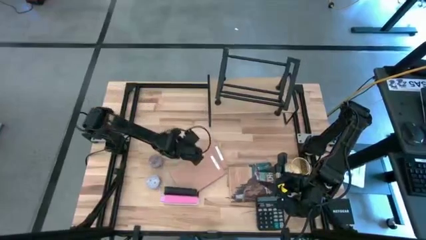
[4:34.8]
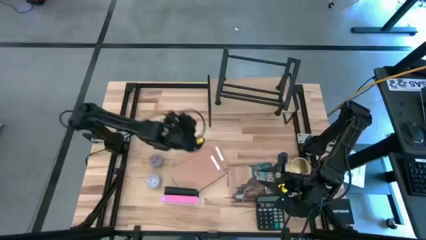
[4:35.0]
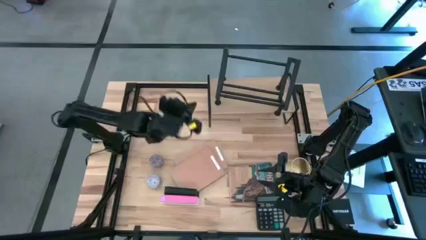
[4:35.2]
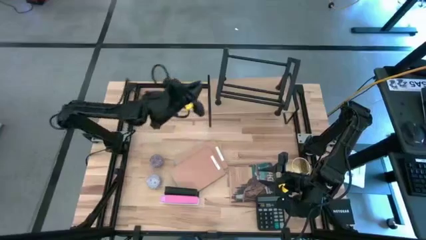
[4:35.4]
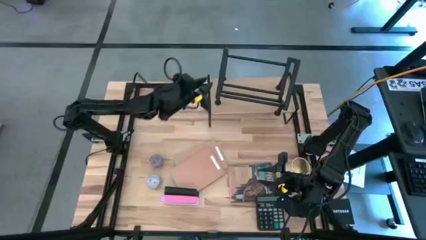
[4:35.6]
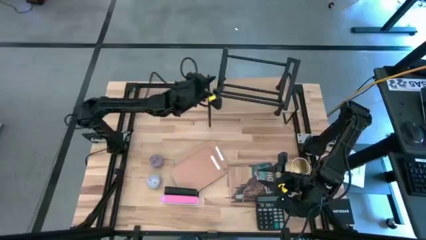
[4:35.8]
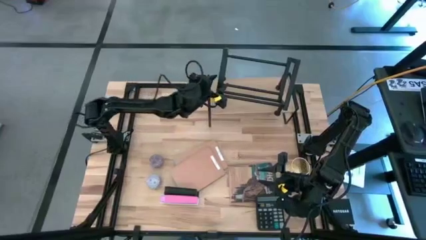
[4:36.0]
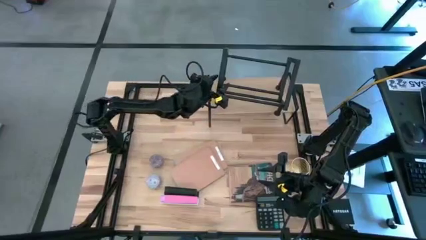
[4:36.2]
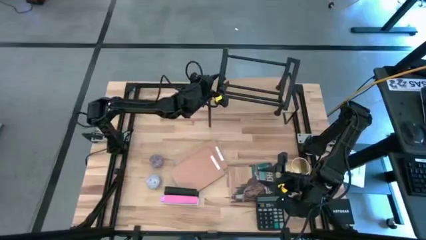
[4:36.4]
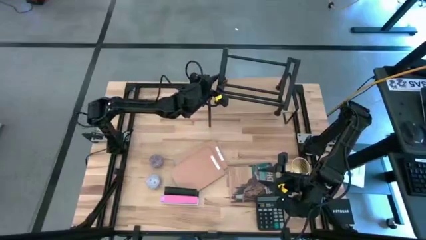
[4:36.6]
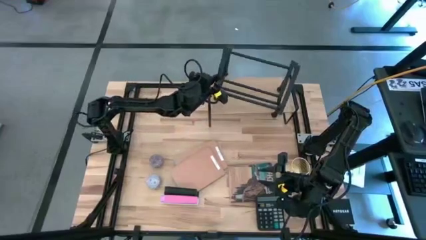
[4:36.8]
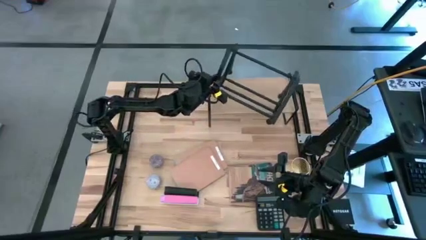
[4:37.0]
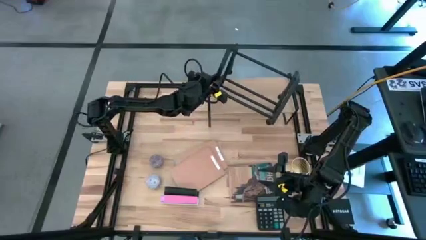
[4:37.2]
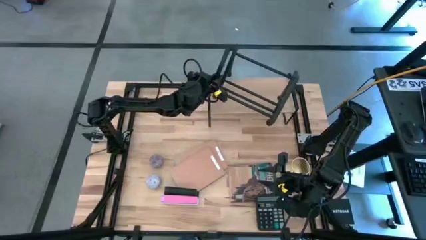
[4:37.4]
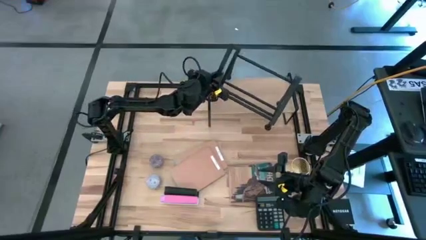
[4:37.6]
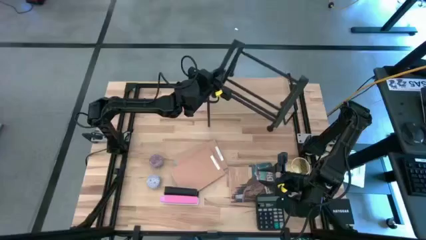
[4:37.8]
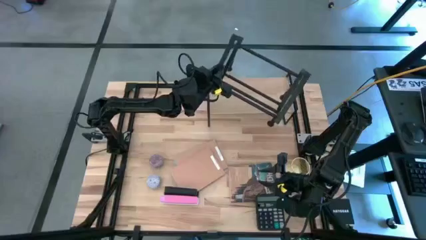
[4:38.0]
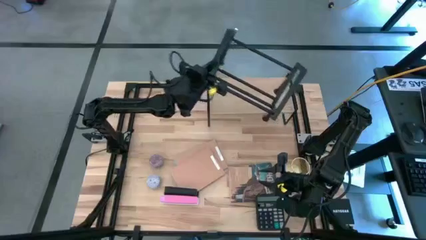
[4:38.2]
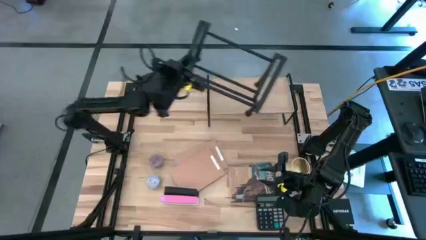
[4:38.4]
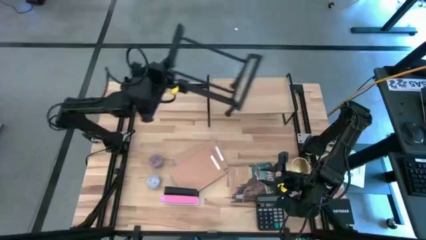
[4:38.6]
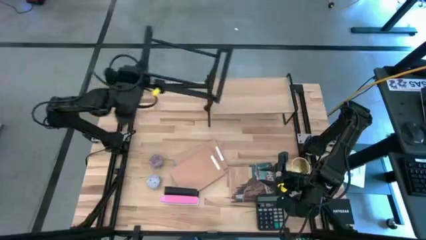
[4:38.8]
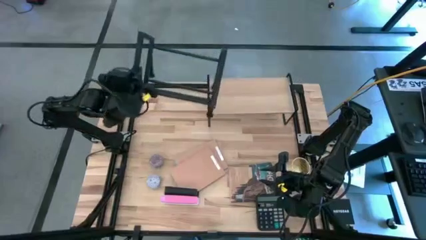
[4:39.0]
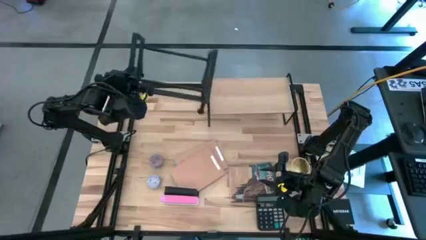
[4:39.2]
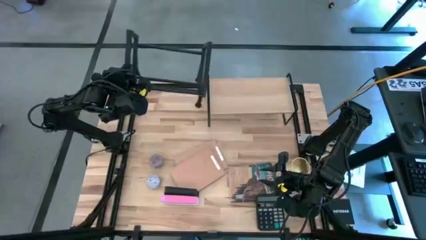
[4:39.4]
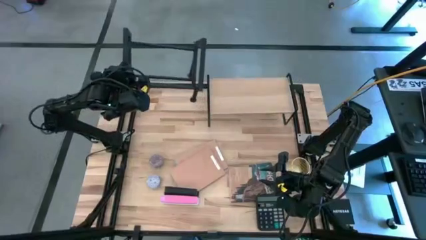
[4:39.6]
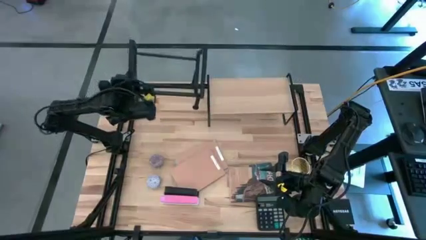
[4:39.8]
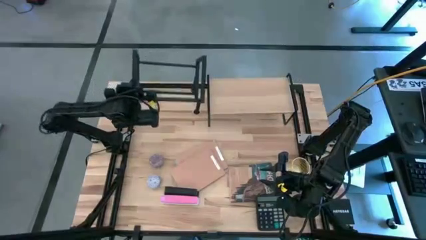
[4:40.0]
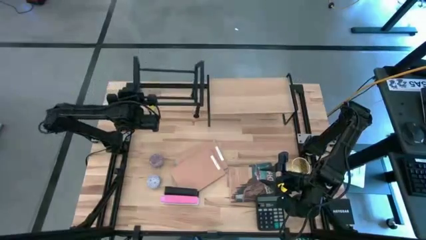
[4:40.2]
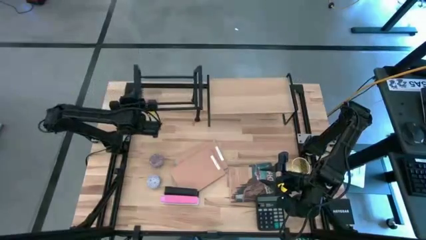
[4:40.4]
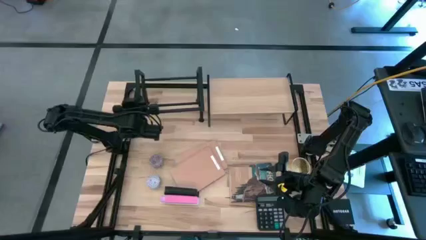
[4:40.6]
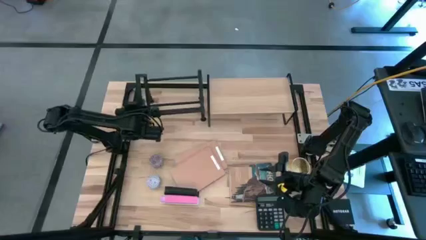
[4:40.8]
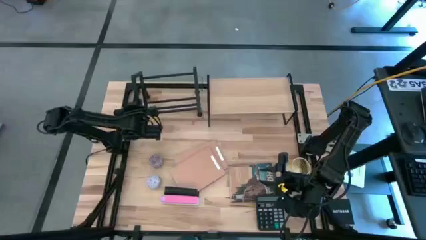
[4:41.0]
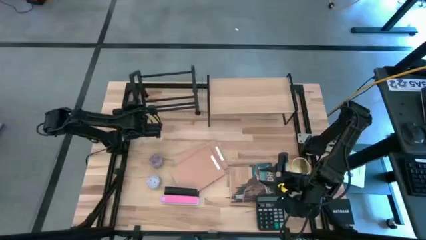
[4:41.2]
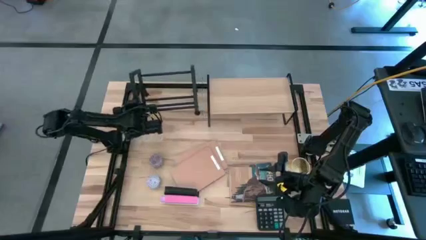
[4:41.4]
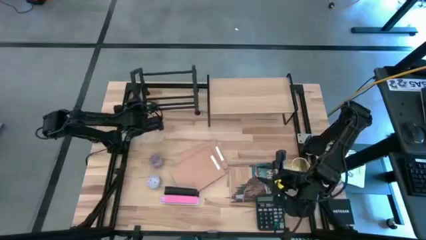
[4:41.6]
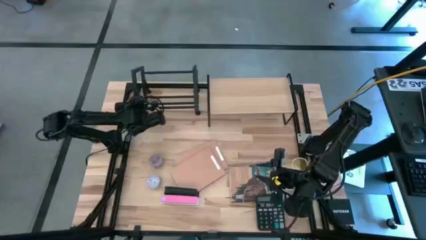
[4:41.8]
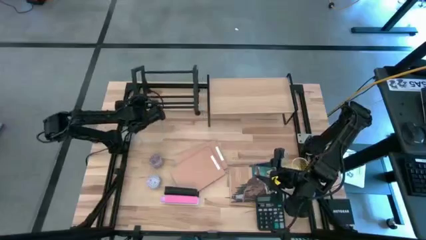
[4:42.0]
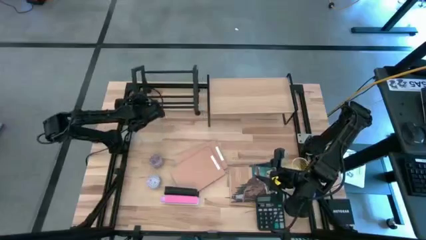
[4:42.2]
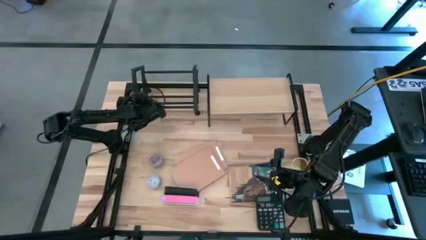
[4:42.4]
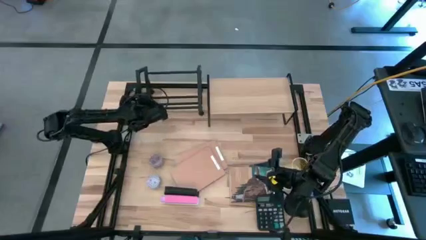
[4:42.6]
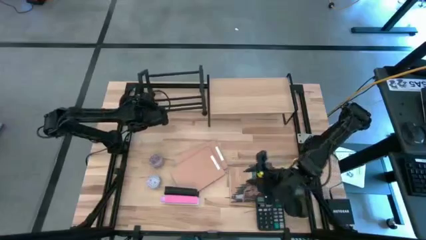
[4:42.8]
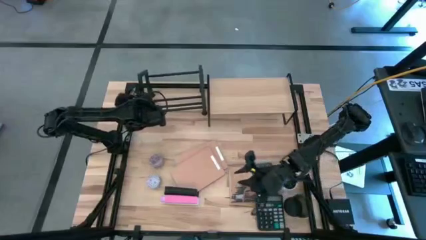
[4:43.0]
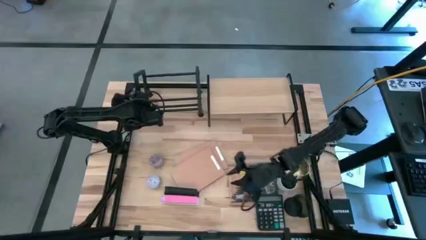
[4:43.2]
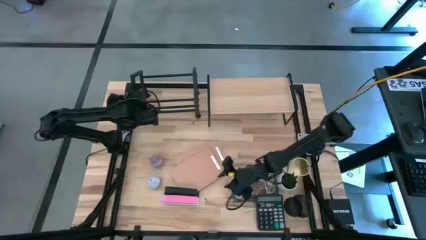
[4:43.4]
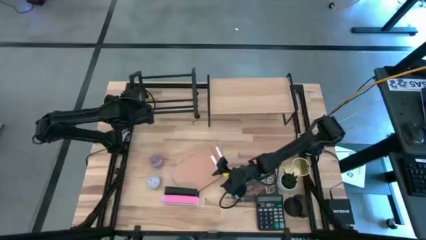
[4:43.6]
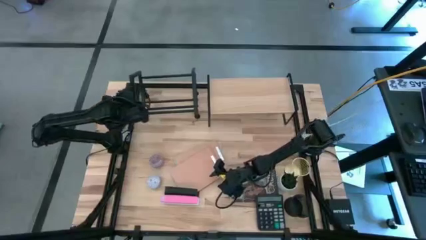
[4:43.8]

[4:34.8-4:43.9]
Task: Stock shelves
Remove the book holder from the shelf

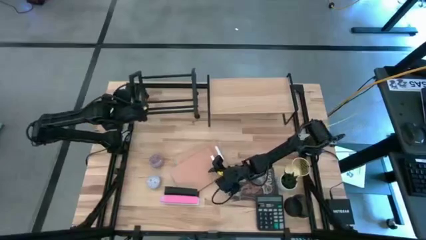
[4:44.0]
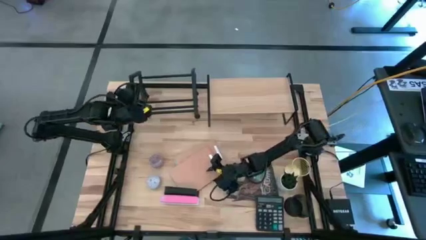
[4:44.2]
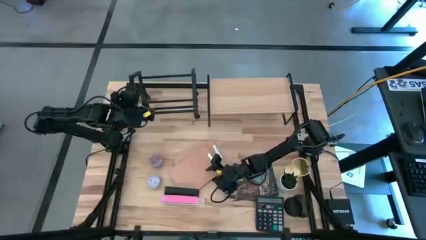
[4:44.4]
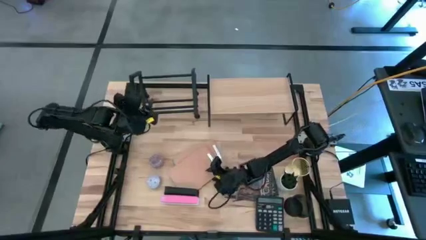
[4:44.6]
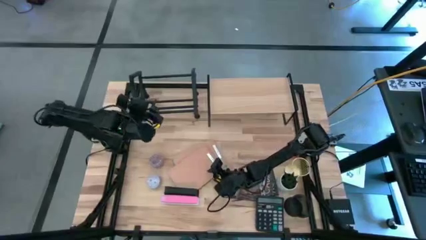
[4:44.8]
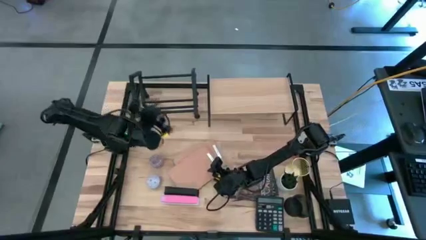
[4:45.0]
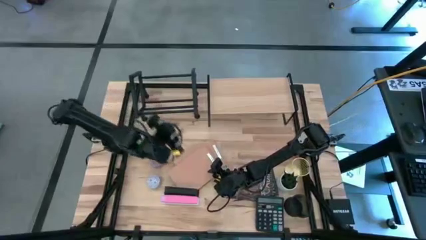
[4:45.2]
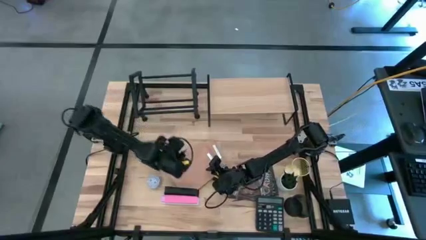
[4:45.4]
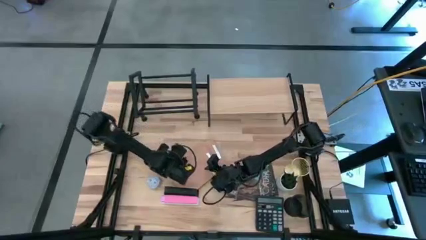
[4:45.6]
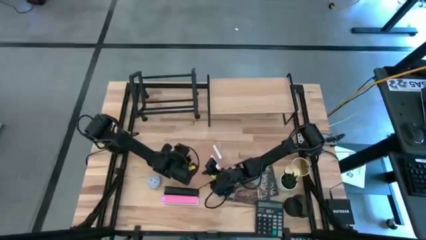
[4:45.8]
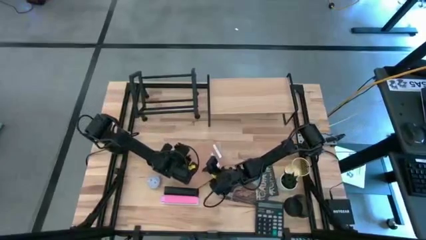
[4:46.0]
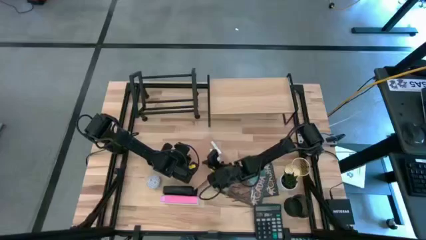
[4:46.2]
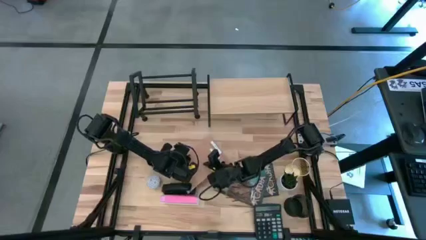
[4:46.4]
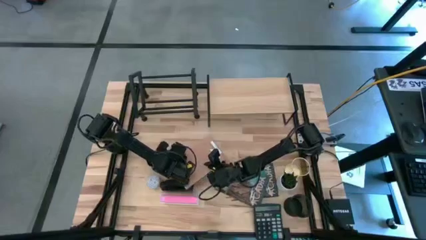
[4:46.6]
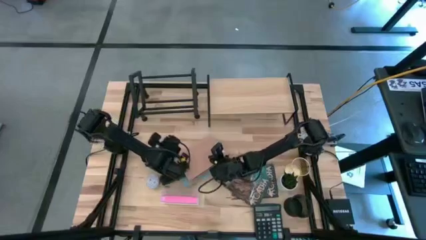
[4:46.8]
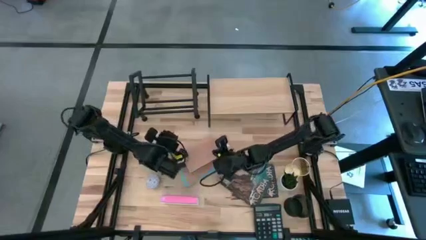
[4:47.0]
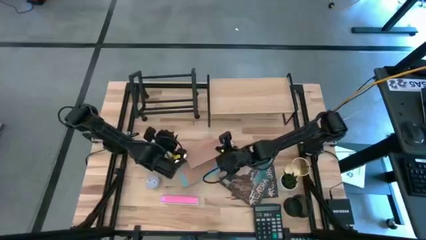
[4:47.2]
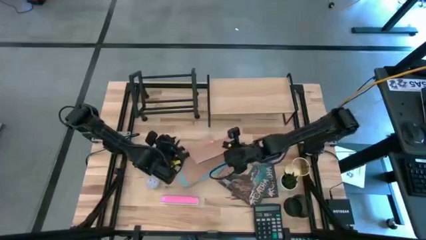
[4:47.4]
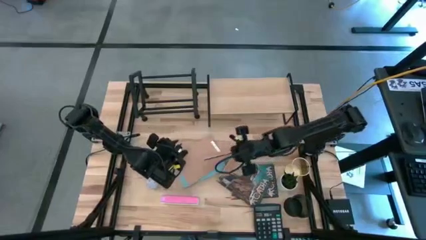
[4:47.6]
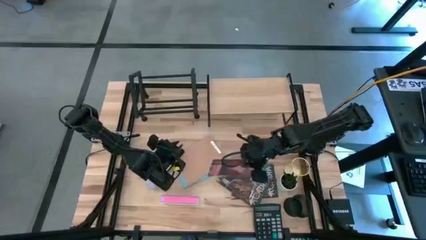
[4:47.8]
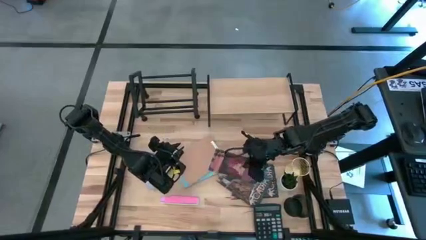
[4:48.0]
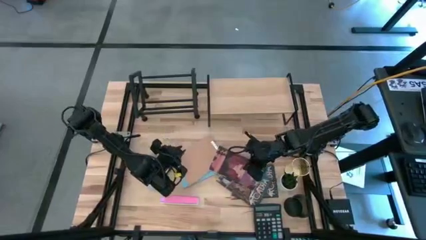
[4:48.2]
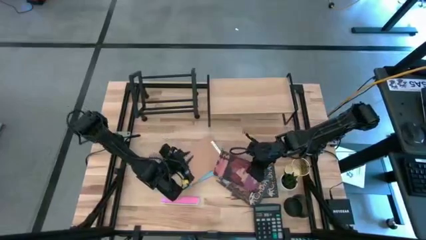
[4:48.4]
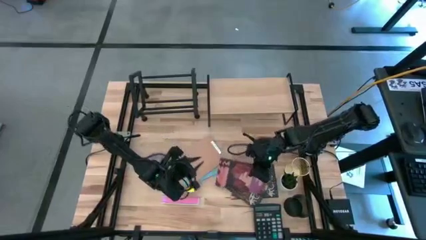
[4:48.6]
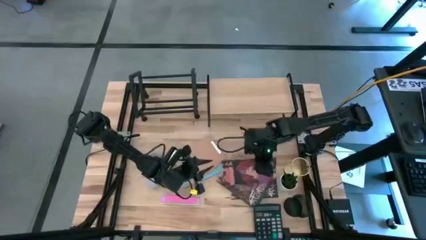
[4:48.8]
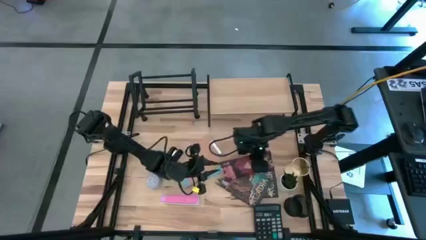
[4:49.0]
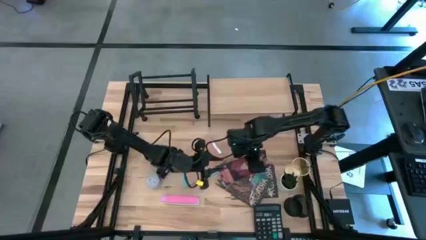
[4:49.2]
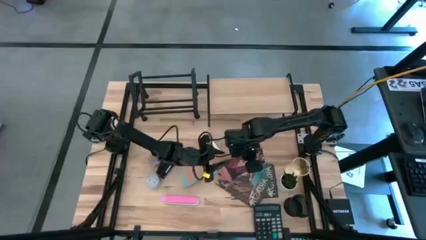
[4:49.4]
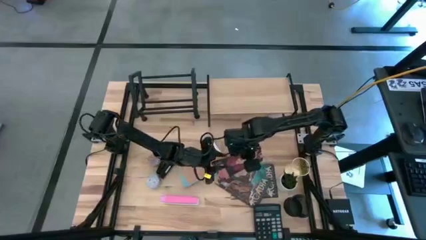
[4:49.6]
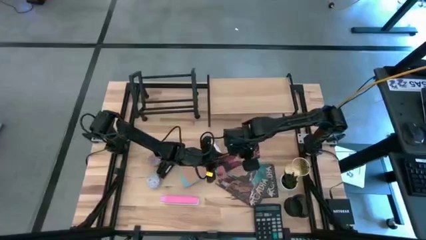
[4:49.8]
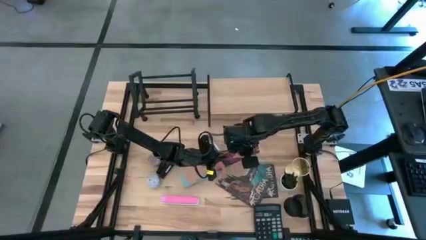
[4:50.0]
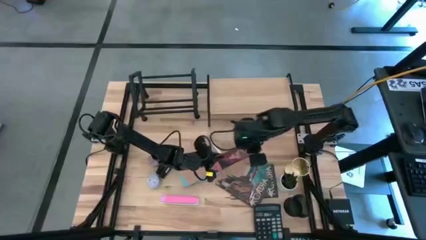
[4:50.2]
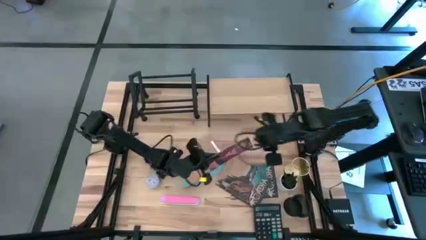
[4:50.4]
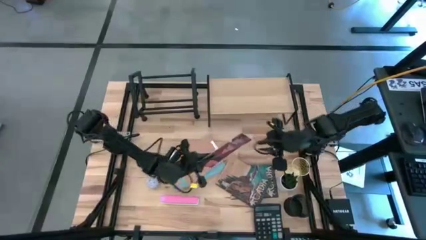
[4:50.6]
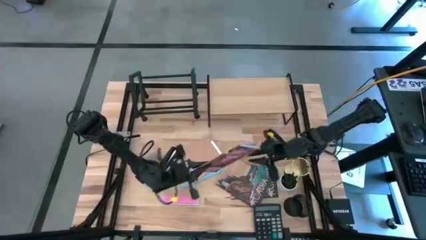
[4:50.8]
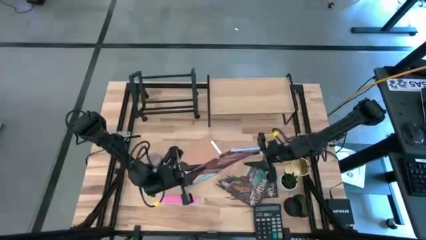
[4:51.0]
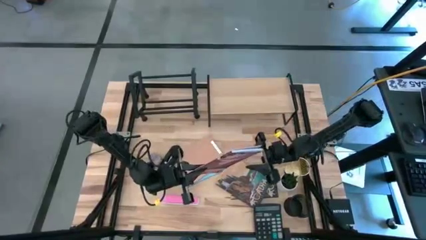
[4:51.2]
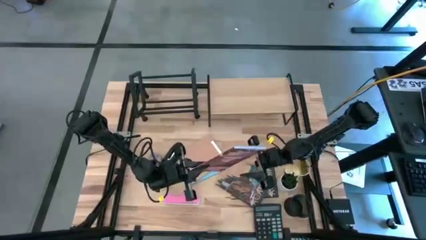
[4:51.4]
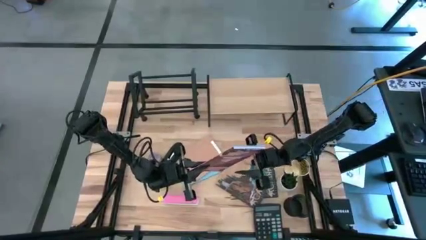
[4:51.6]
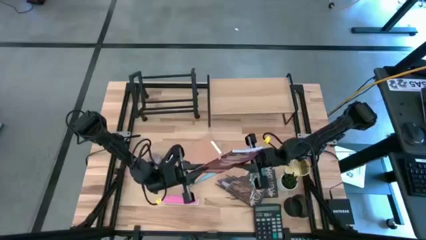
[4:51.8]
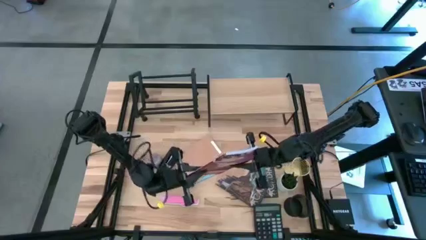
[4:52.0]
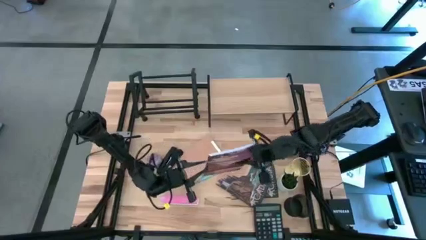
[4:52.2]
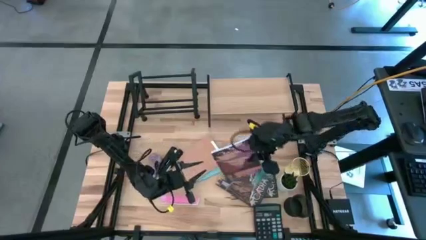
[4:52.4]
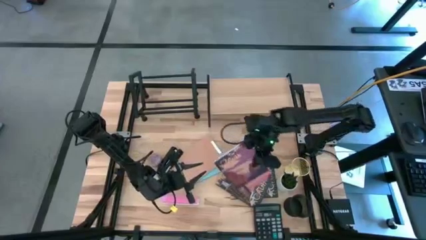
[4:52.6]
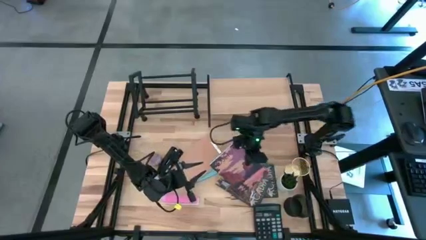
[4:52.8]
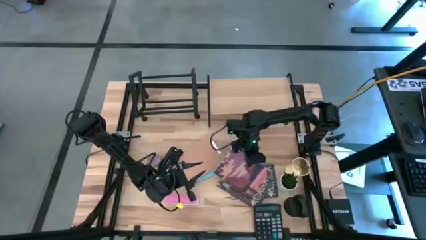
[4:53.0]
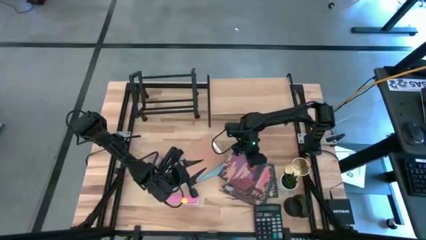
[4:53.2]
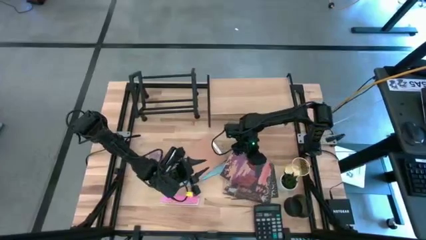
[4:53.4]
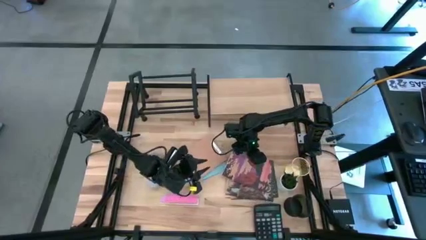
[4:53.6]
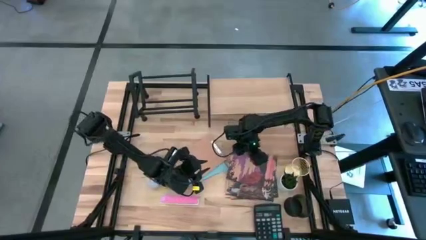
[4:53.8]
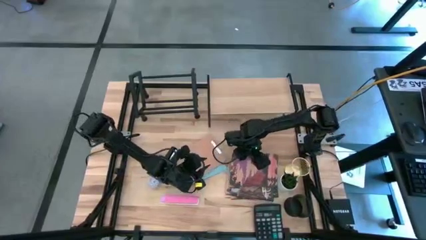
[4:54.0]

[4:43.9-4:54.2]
Stack the brown book on top of the brown book
